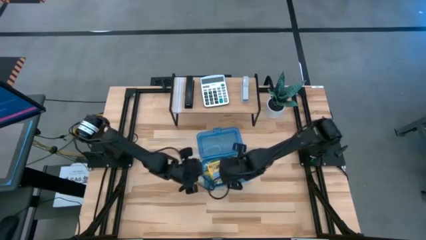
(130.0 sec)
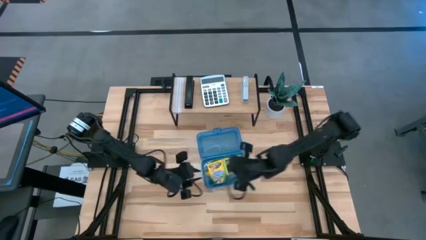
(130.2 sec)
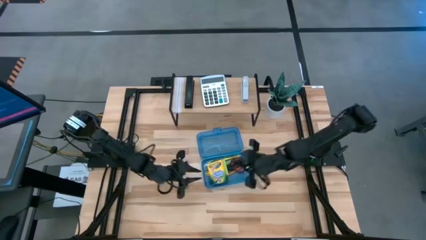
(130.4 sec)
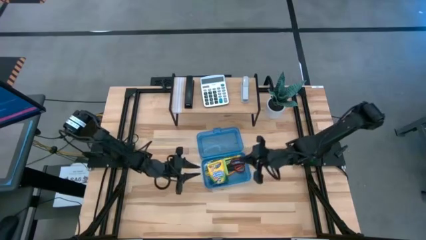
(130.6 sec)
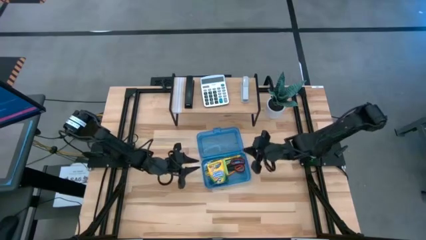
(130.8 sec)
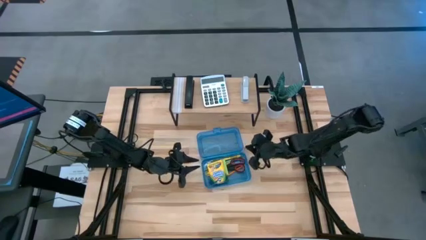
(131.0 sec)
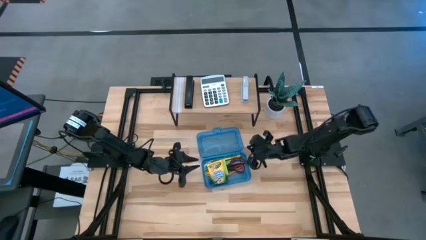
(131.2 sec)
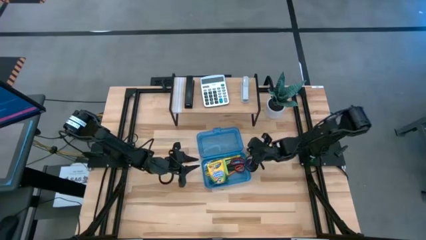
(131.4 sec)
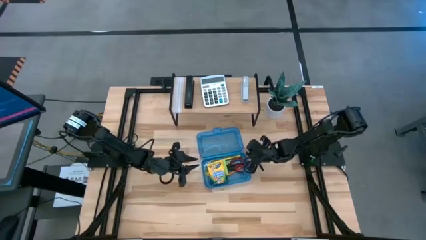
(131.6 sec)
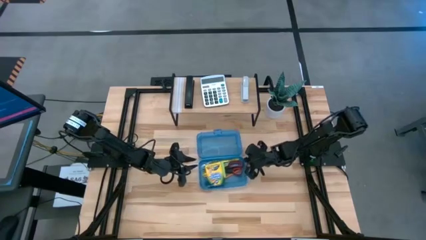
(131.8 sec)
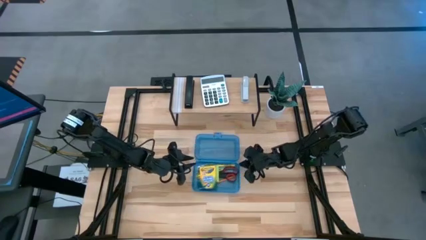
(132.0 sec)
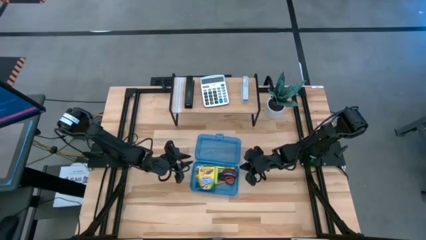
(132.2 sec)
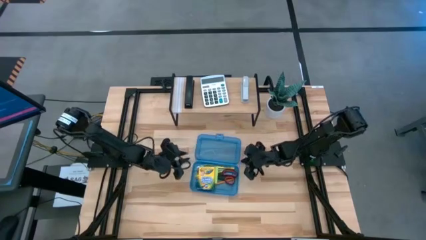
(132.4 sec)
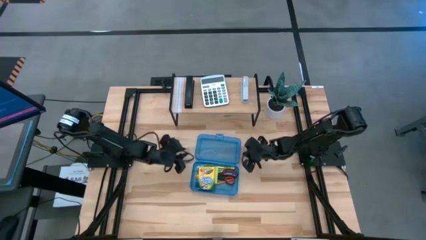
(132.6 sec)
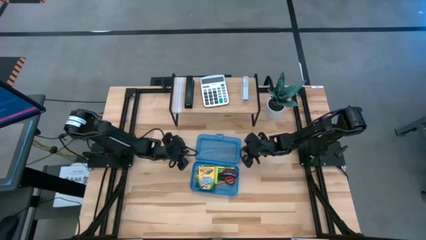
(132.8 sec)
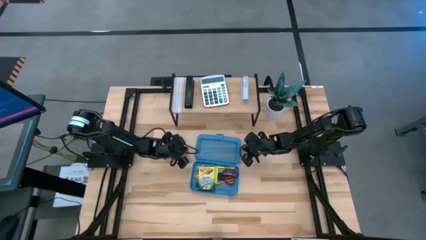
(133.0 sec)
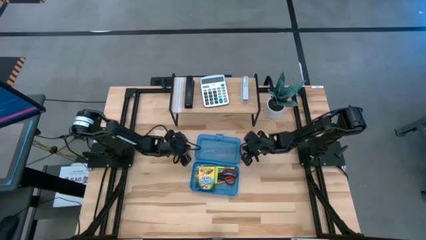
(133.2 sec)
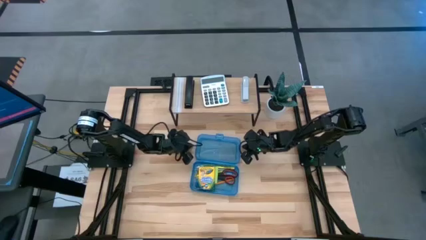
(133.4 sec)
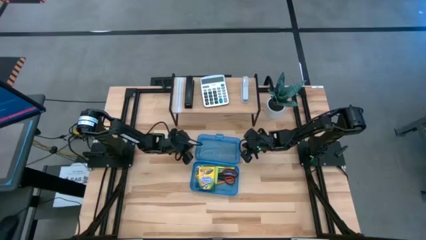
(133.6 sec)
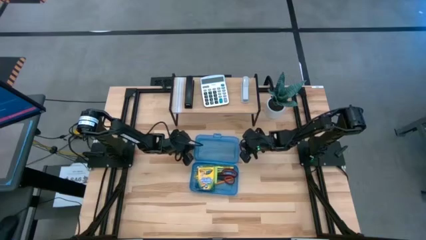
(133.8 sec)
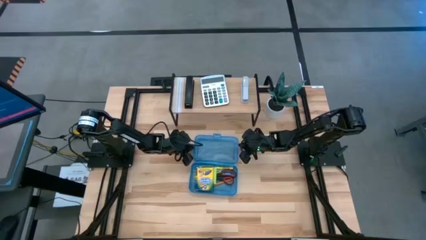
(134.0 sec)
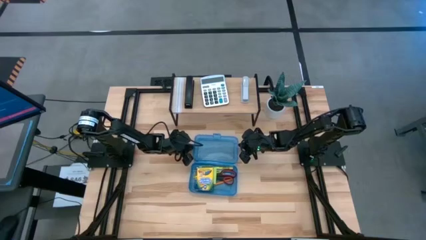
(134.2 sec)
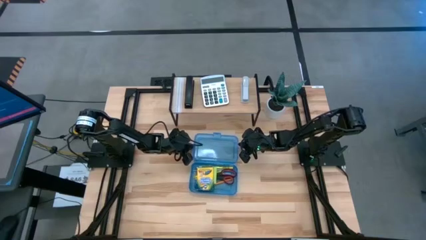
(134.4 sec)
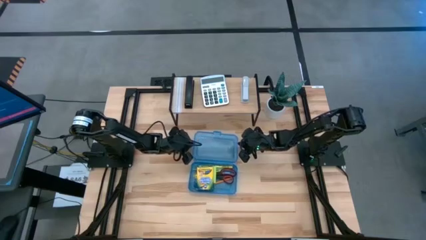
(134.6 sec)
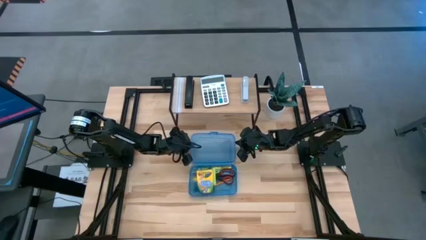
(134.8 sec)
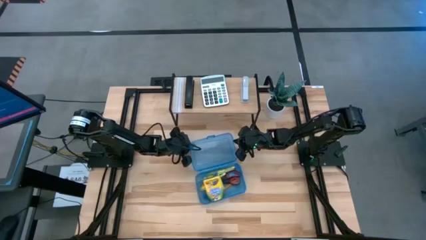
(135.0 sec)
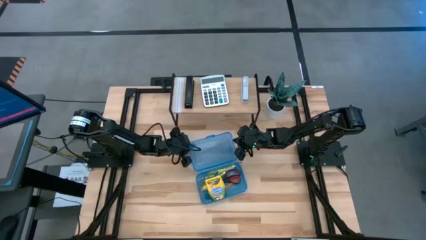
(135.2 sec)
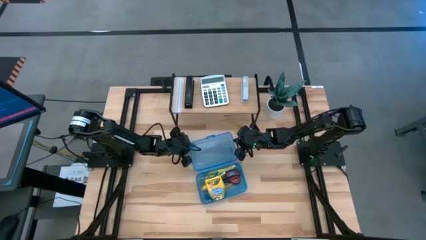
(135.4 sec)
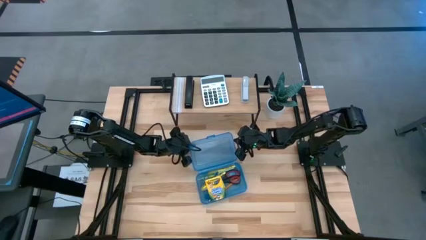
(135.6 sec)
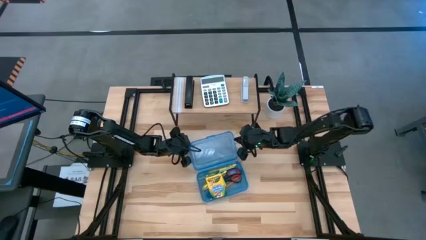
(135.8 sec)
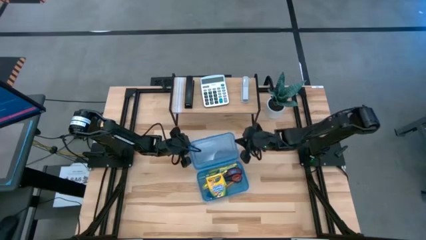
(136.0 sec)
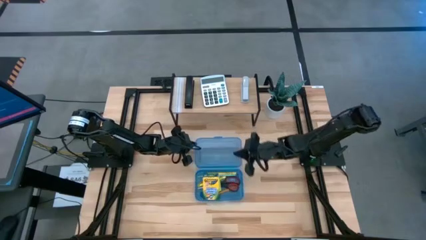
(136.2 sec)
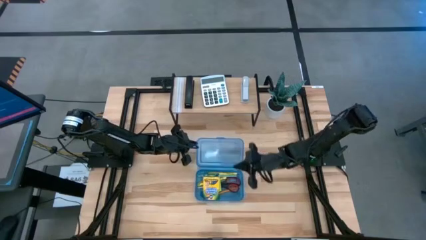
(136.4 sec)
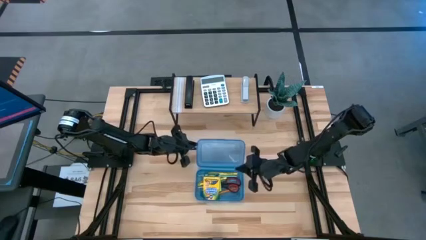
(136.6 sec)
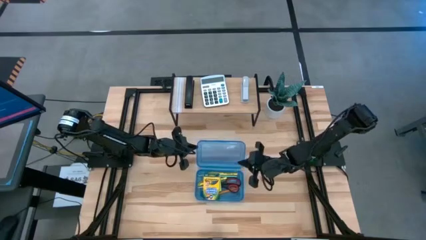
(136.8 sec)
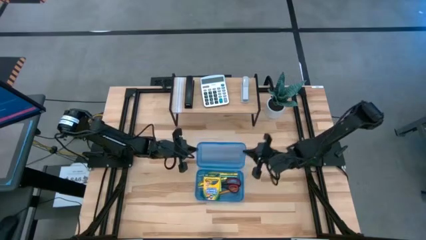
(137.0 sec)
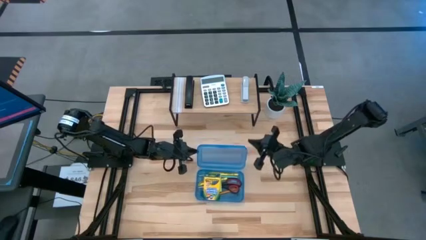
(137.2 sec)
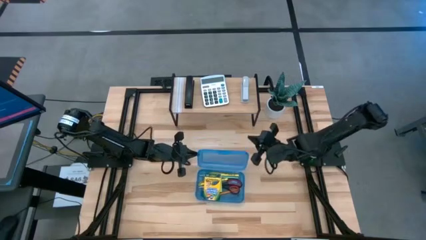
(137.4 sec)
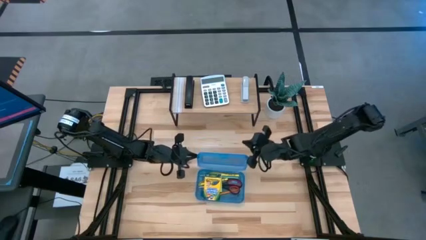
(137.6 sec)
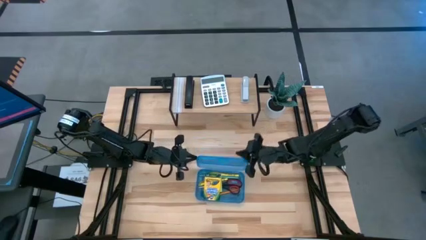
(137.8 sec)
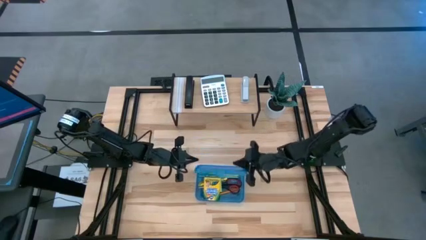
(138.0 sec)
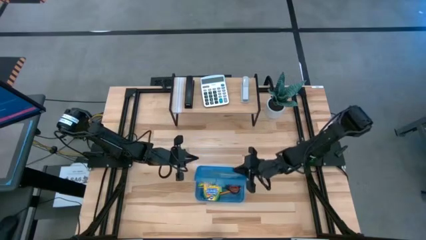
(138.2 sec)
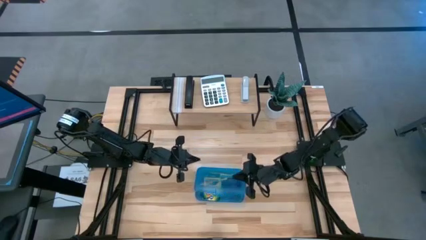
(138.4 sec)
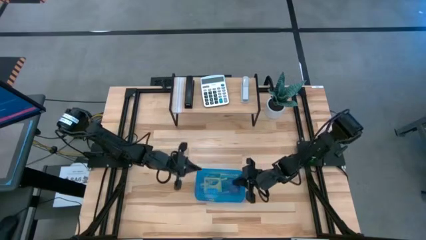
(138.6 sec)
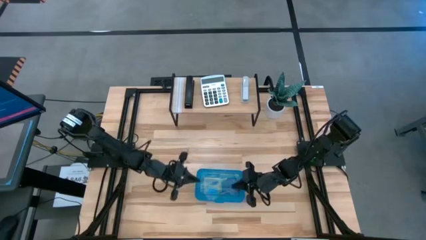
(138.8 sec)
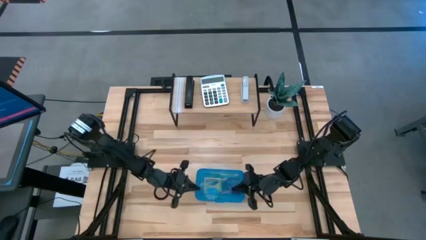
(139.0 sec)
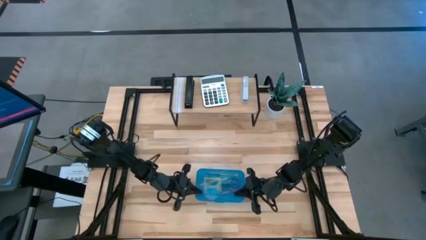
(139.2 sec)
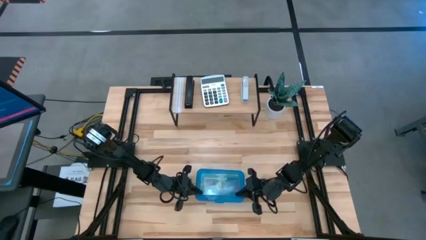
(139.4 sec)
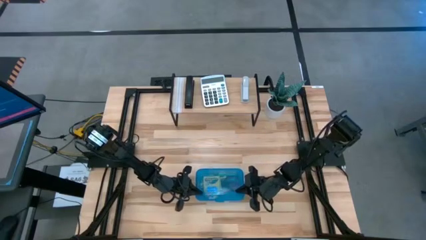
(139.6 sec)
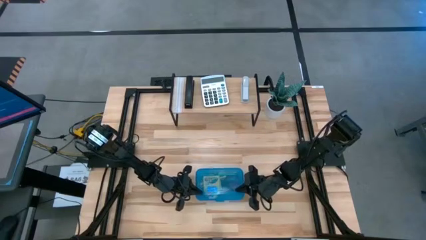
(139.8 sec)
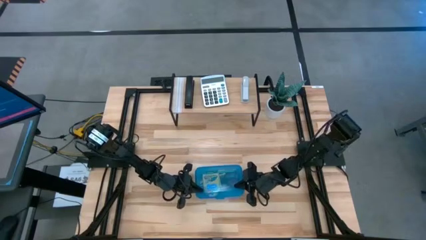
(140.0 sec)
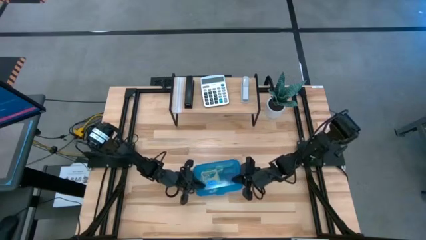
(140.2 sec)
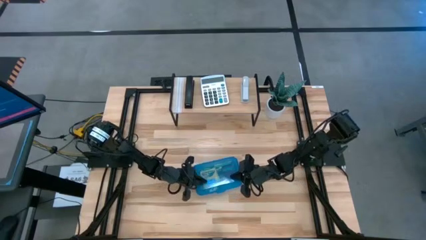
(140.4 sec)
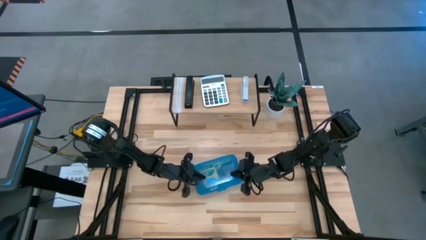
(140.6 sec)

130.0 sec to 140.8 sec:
Task: Pack school essentials
Close the blue supply box

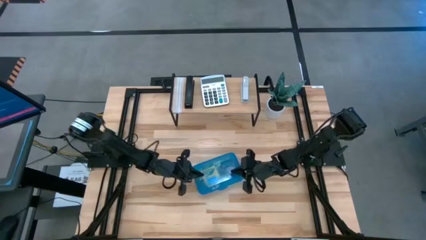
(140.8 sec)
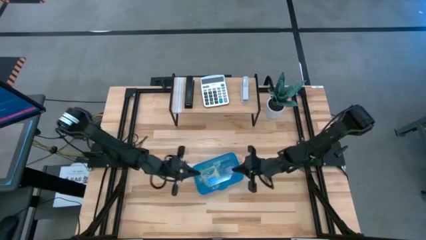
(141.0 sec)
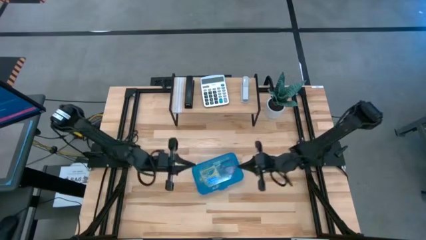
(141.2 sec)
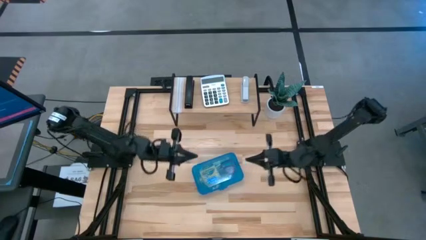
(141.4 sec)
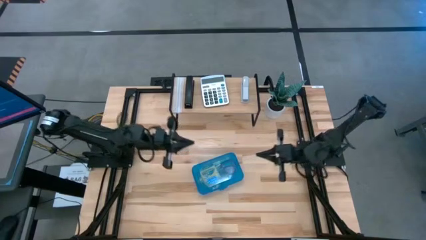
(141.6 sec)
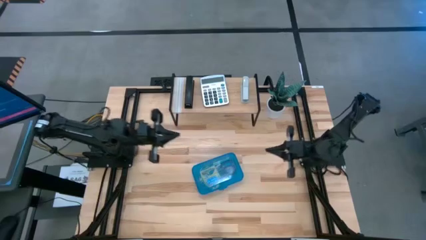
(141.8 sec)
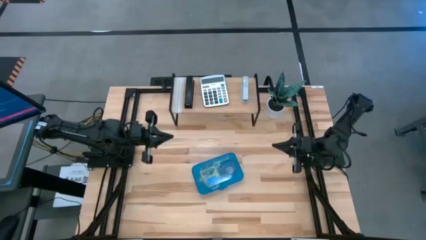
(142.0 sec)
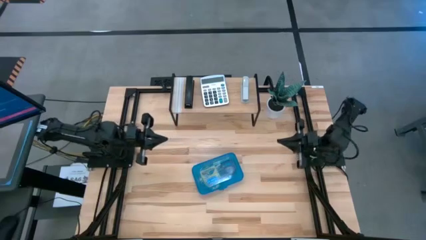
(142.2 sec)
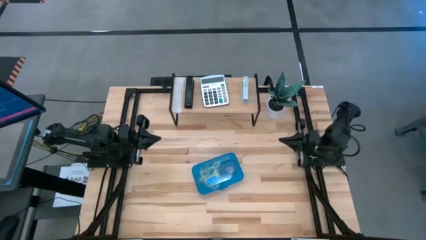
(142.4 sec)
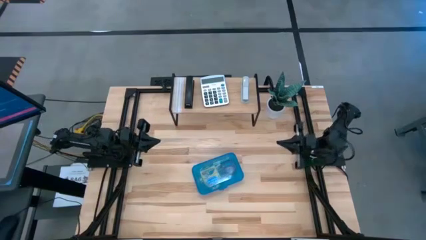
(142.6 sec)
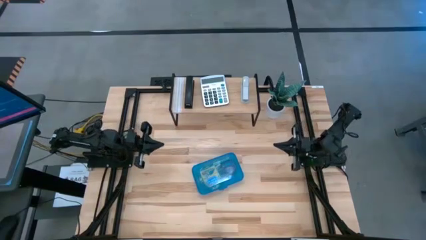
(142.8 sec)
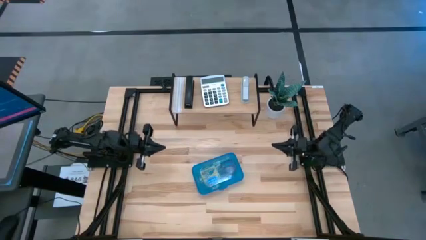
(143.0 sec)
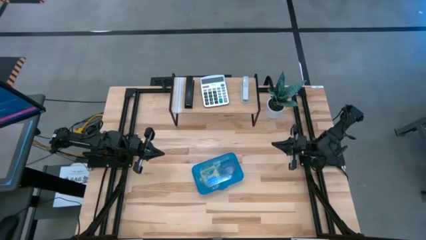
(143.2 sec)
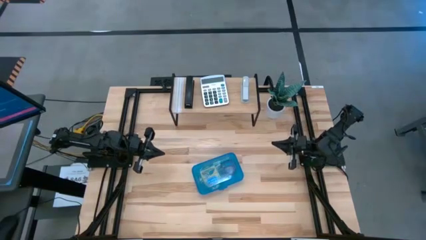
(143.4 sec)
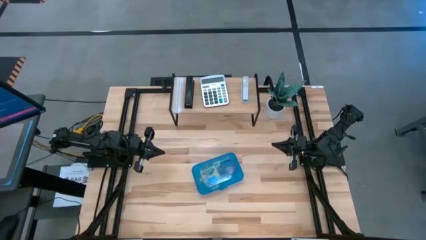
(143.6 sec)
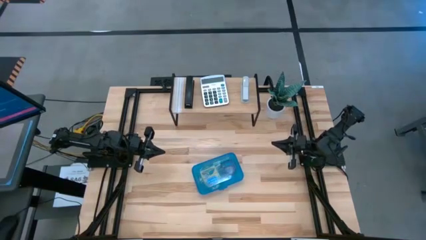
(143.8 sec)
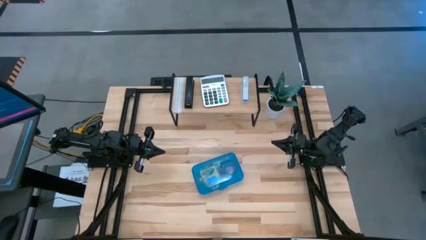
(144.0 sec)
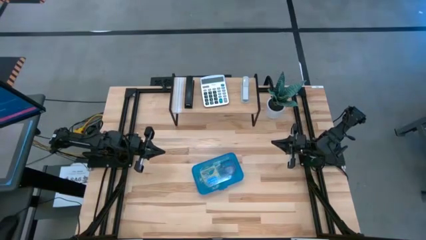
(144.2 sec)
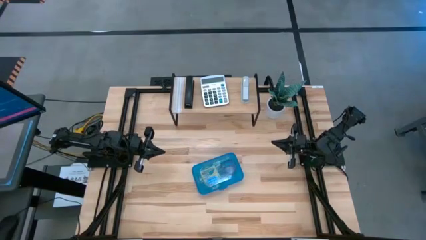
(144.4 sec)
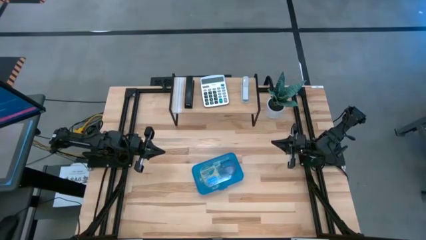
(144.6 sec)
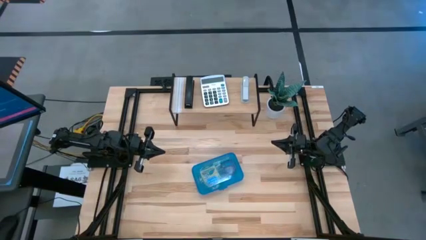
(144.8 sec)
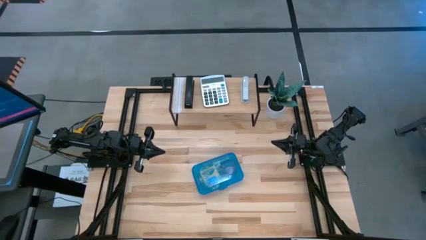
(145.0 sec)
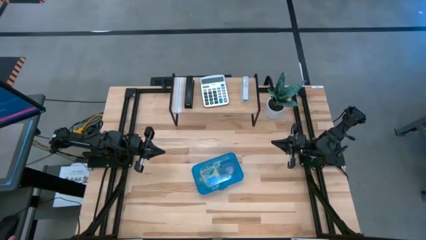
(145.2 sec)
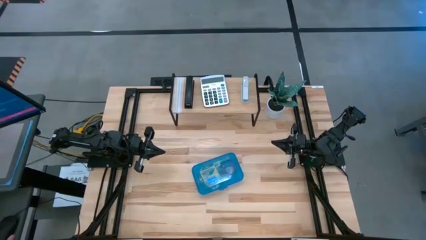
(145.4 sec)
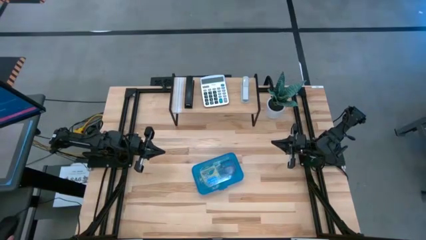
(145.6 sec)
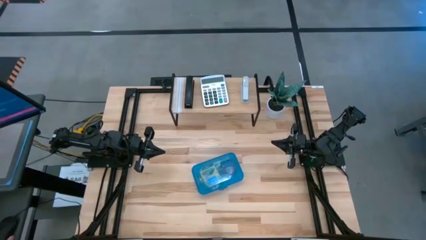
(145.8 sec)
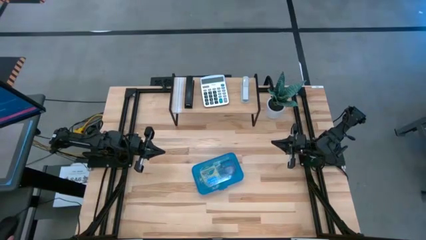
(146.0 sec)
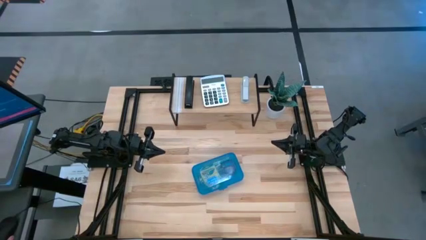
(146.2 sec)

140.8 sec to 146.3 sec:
Return to Home Position
